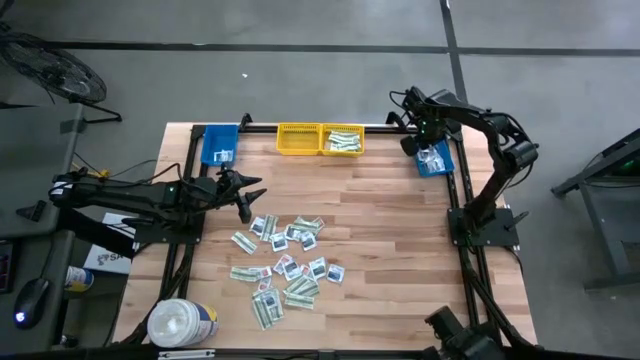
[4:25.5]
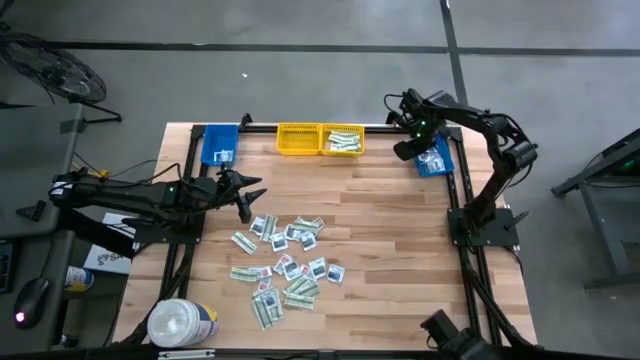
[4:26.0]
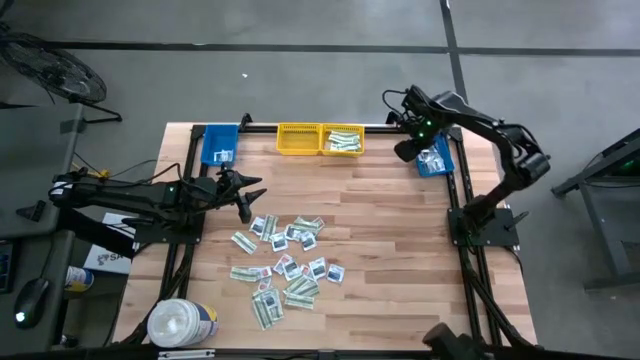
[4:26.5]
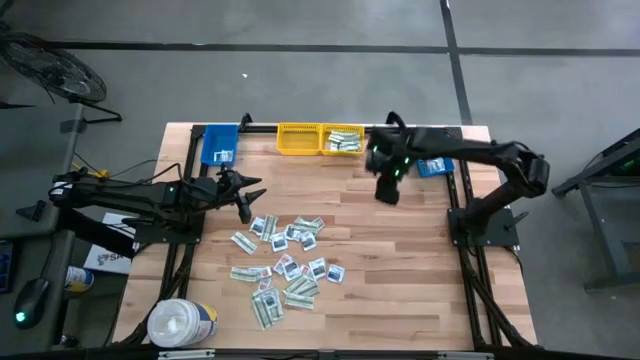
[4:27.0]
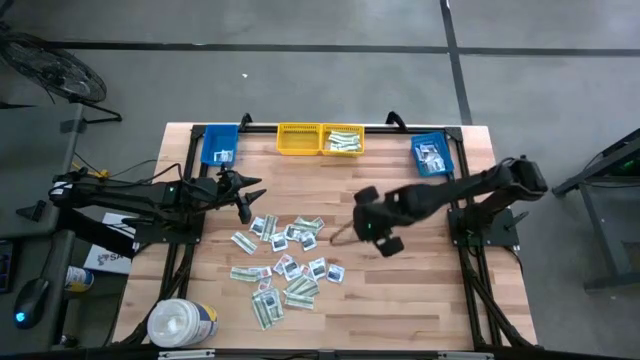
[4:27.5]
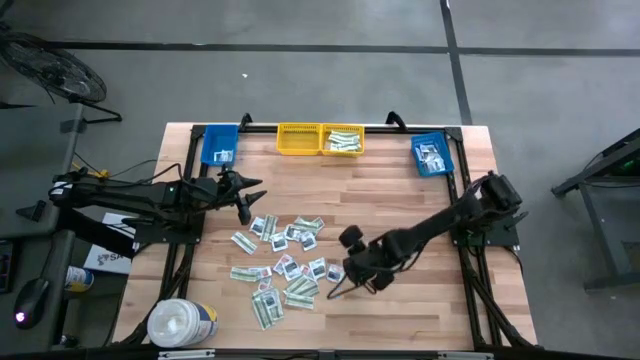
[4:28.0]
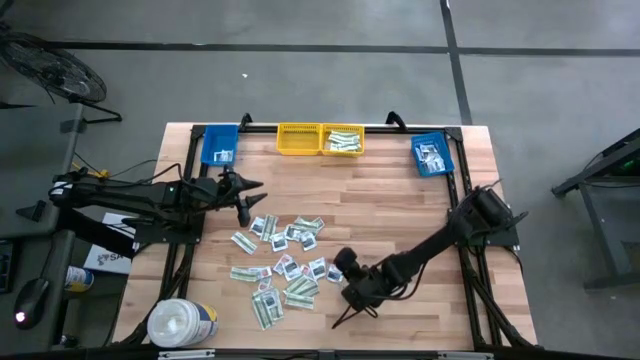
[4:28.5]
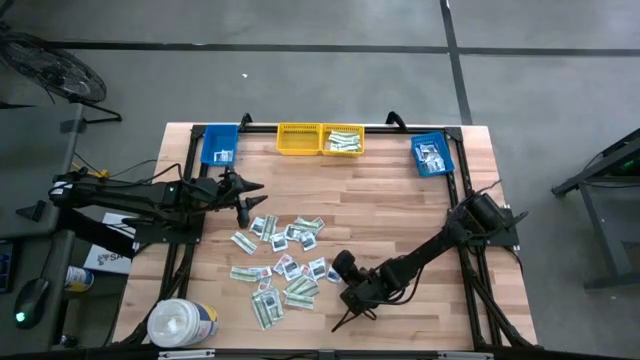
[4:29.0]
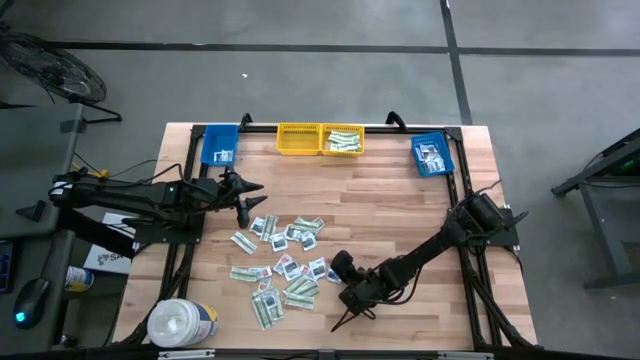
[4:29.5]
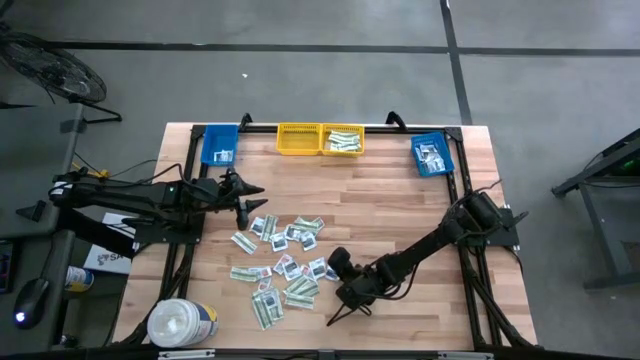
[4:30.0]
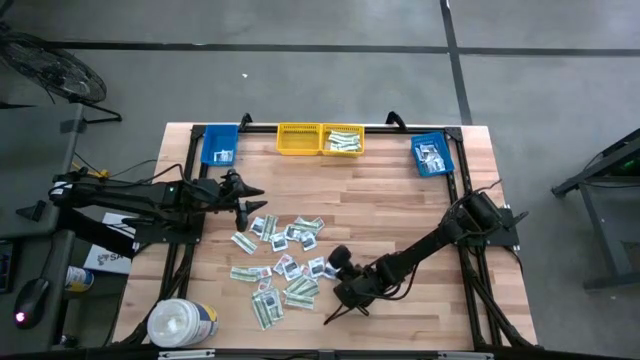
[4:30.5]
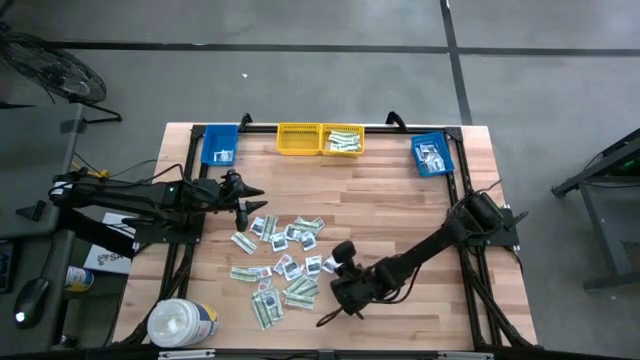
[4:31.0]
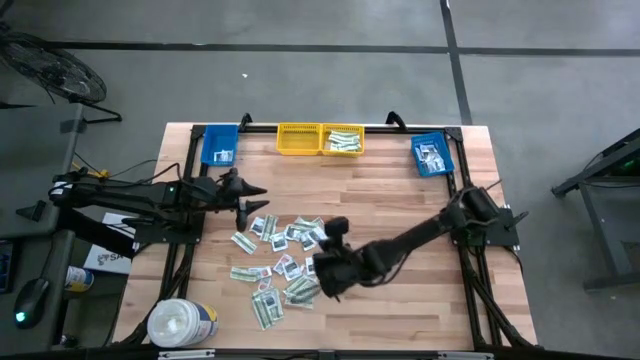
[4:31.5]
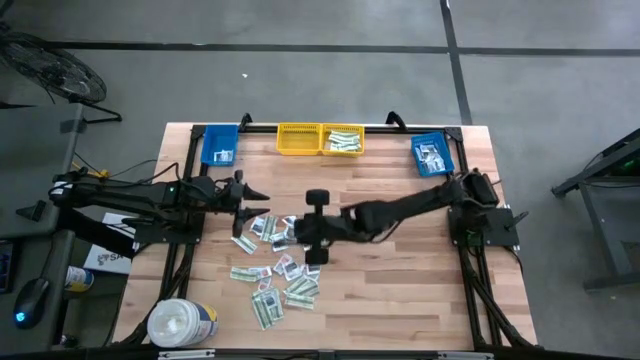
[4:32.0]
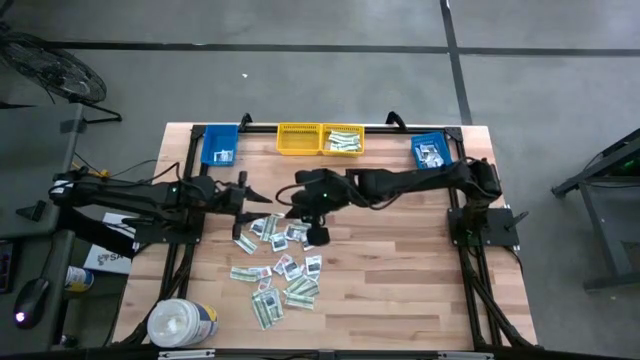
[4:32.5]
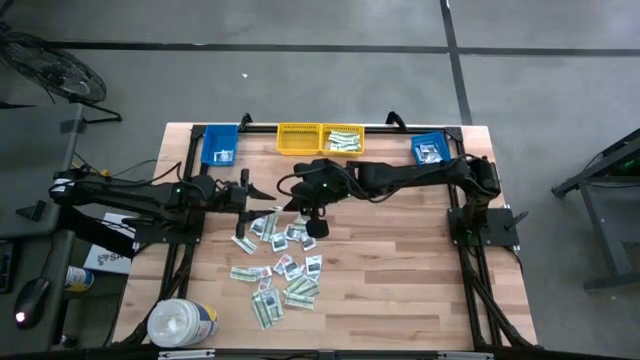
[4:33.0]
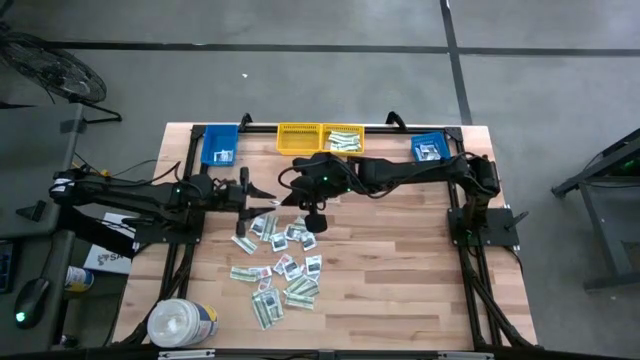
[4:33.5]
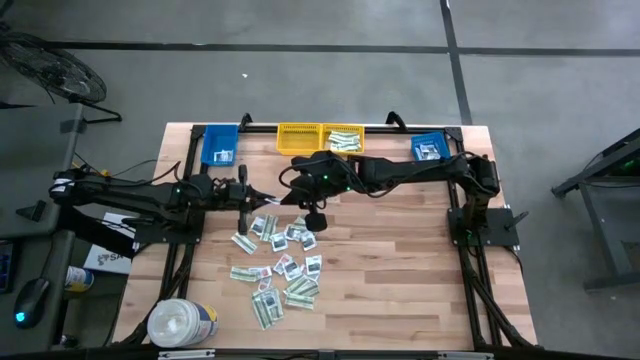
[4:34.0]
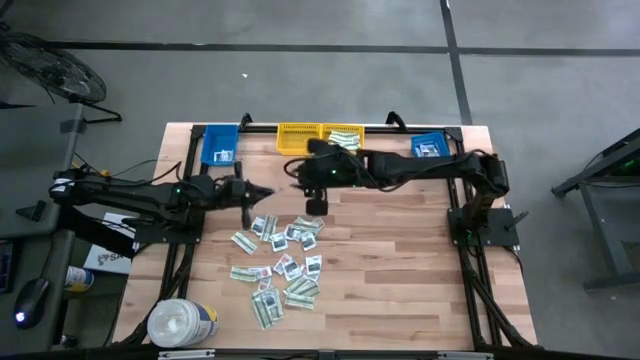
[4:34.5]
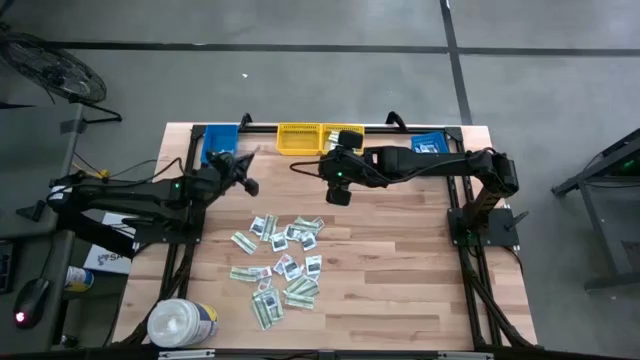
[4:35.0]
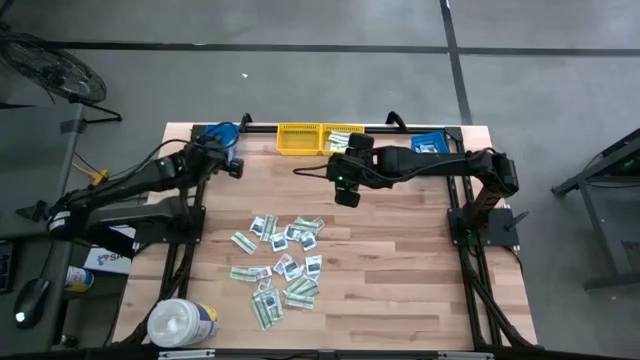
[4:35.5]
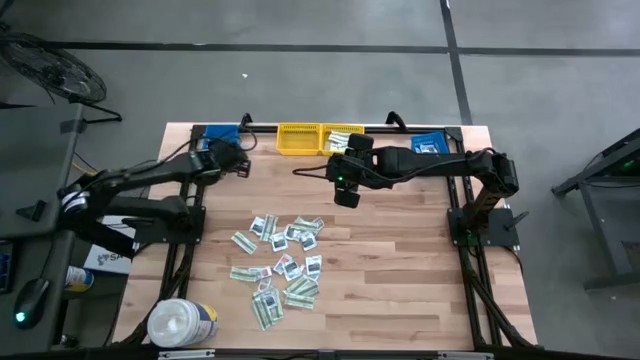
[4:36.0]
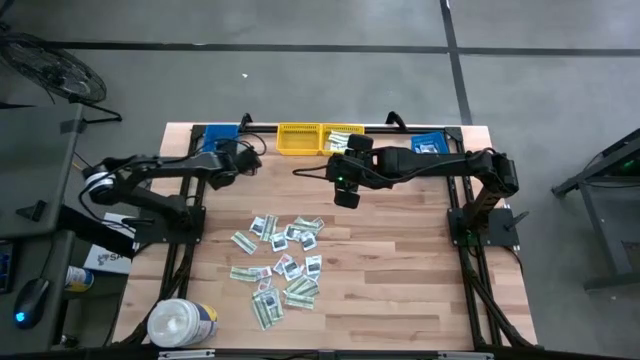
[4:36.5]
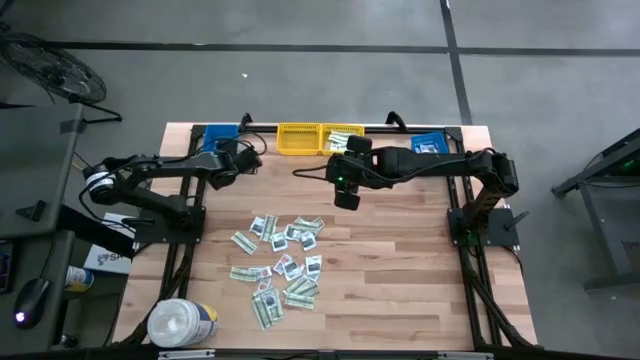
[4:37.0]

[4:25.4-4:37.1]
Task: Pick & Place First Aid Supplies
Put the blue alcohol pad into the left blue bin

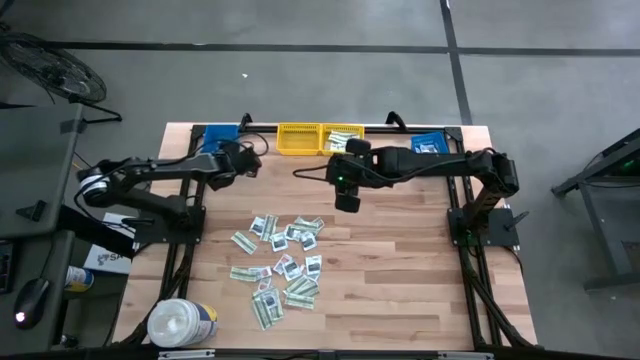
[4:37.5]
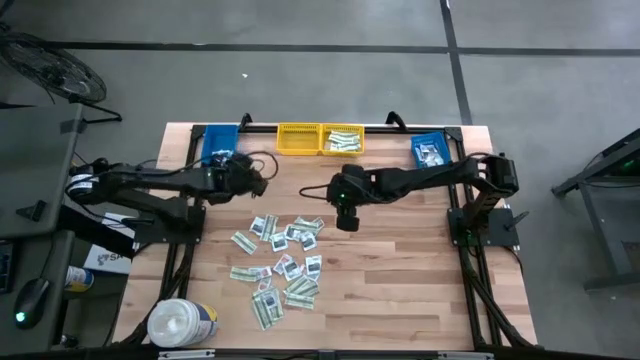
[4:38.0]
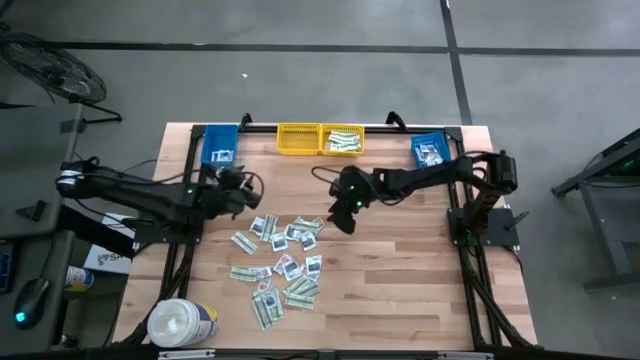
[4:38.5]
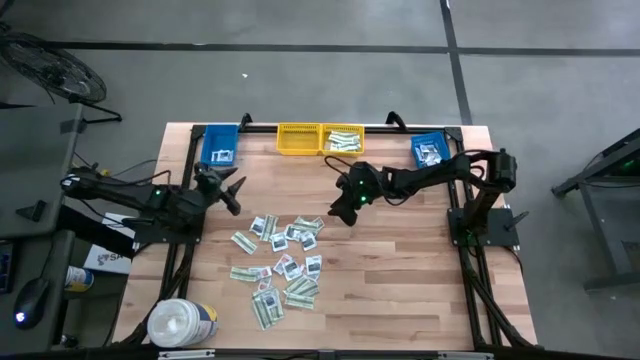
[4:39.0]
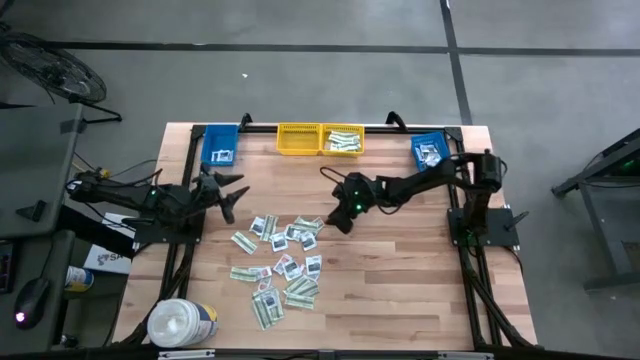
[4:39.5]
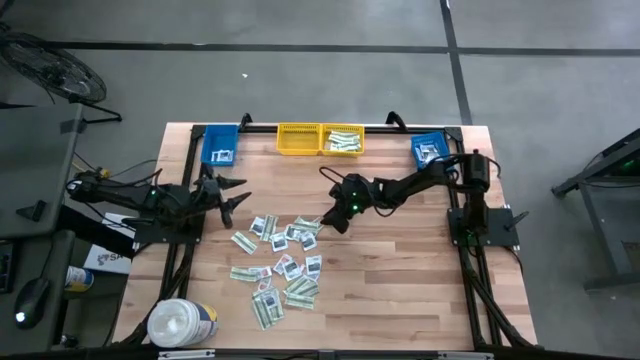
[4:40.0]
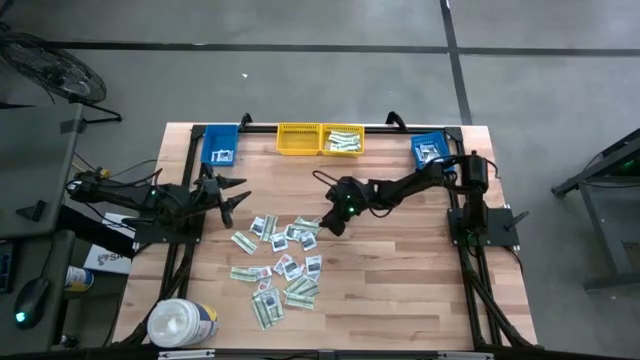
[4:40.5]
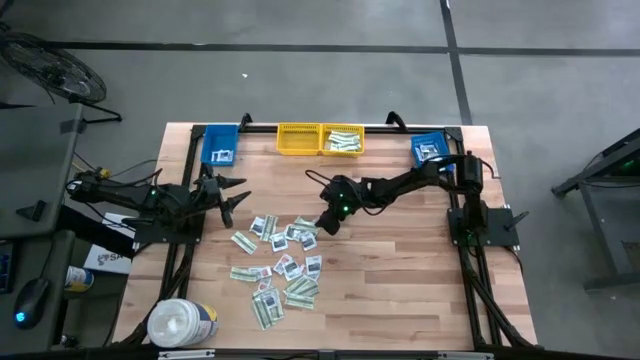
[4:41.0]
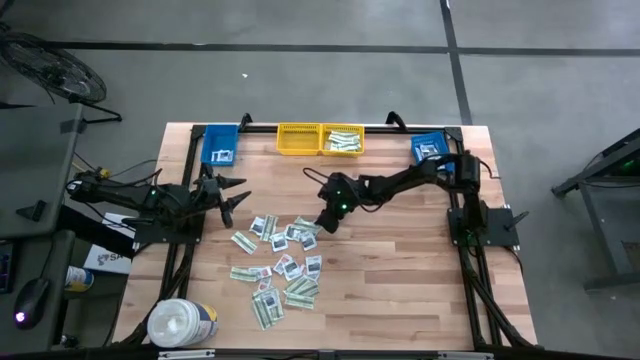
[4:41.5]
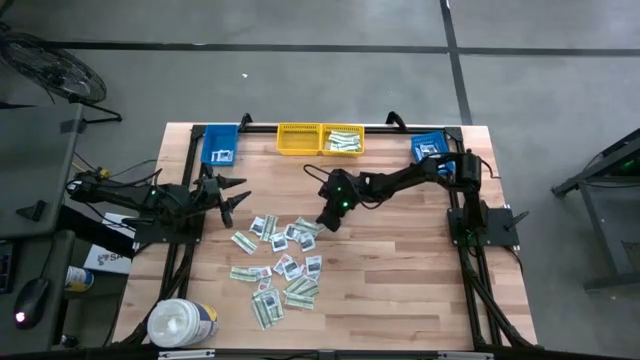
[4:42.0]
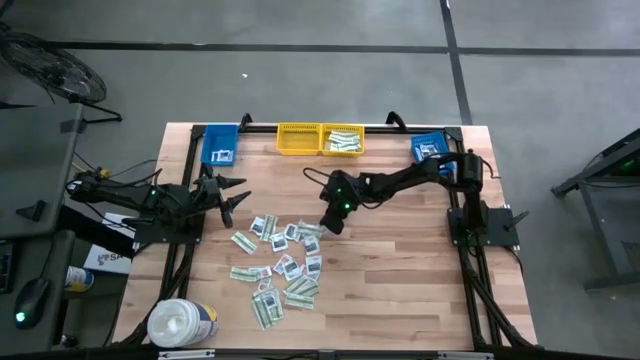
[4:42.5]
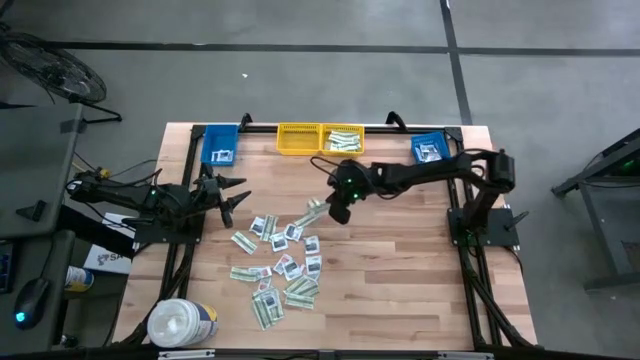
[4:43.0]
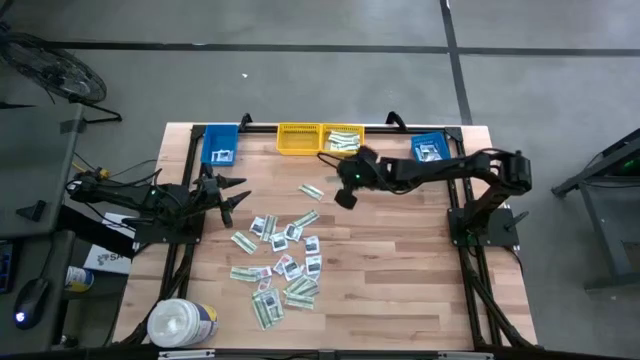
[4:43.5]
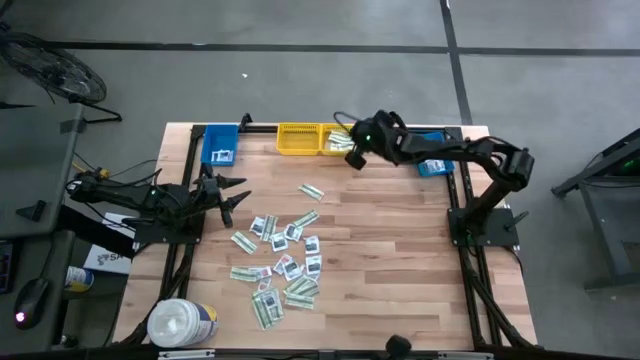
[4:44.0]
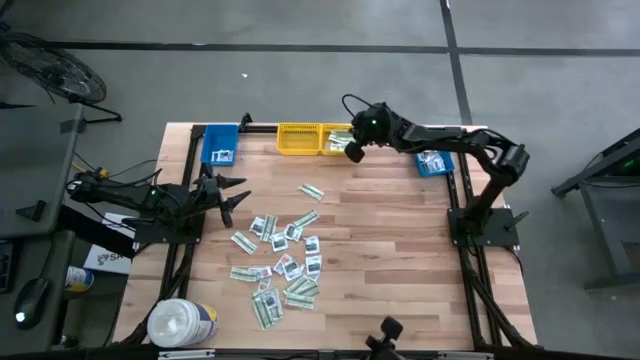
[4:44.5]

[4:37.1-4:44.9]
Put the green bandage pack into the right yellow bin
